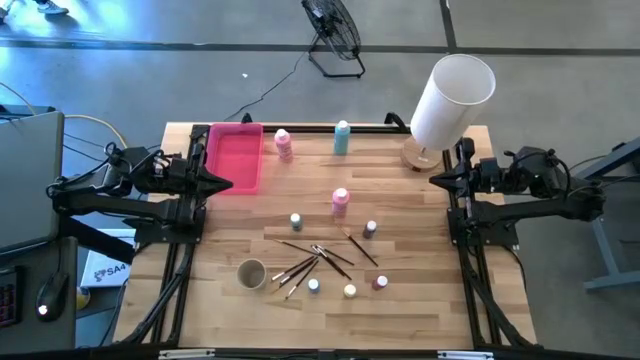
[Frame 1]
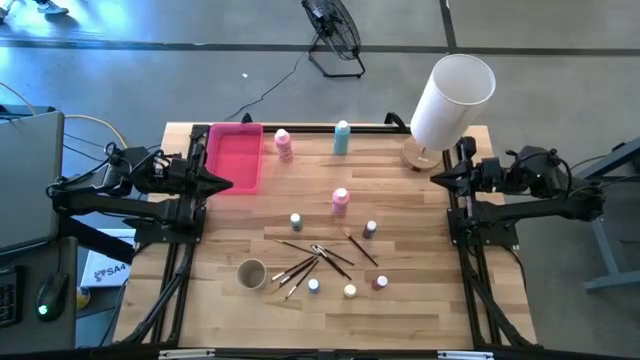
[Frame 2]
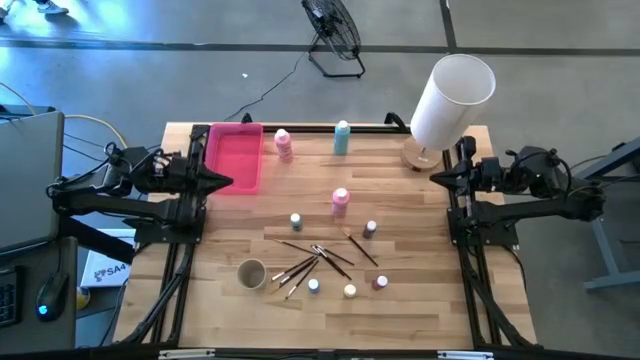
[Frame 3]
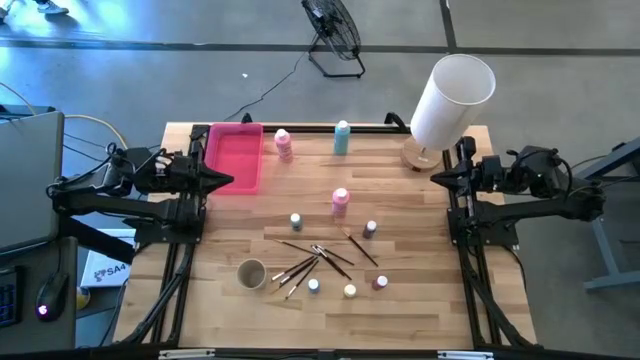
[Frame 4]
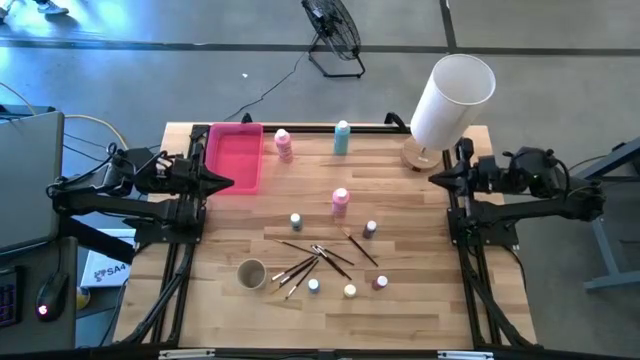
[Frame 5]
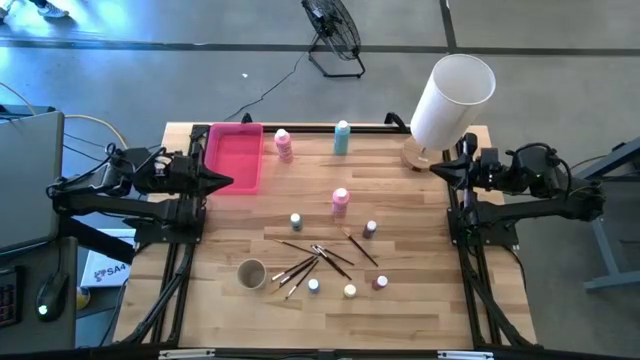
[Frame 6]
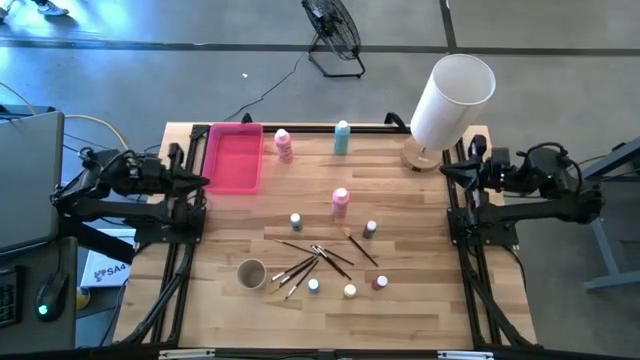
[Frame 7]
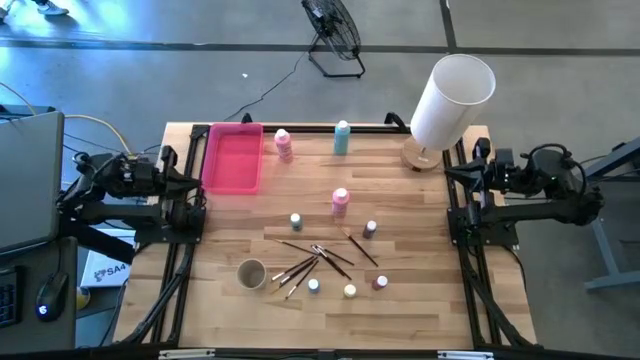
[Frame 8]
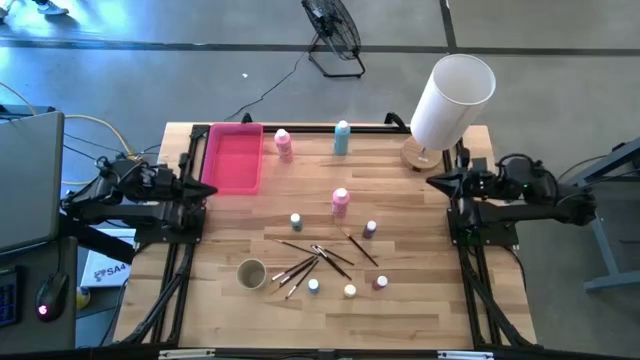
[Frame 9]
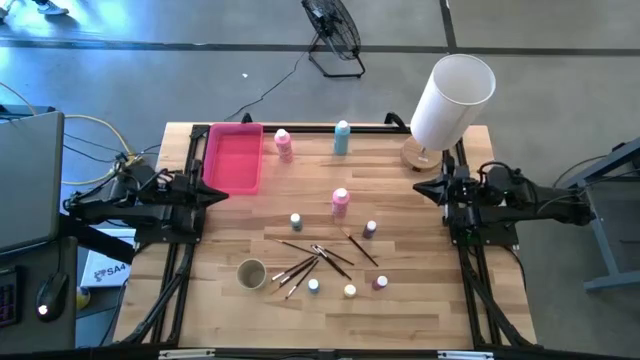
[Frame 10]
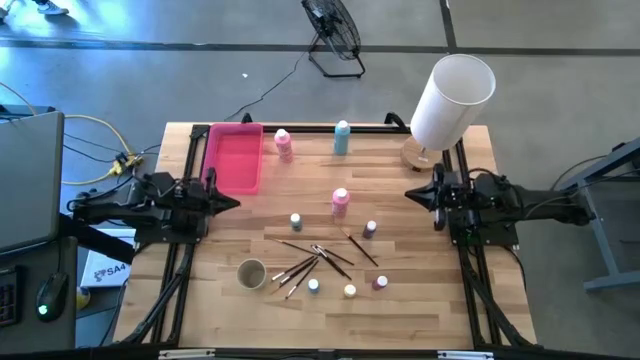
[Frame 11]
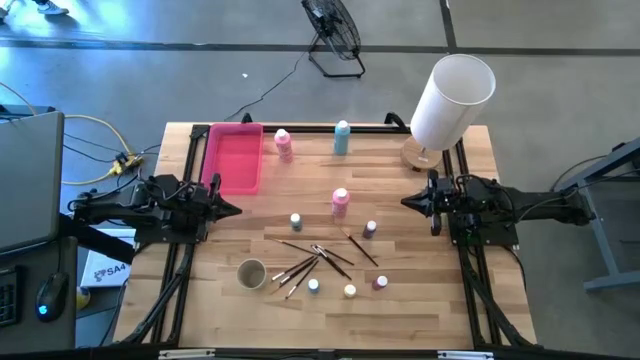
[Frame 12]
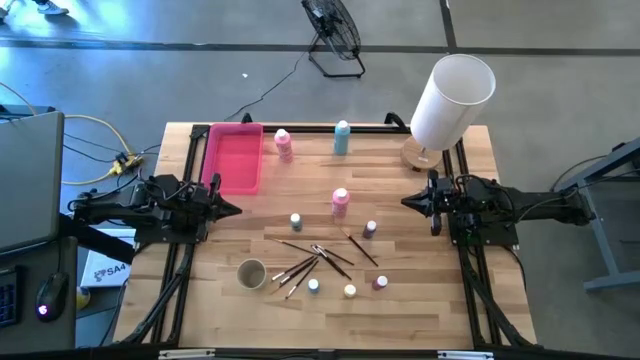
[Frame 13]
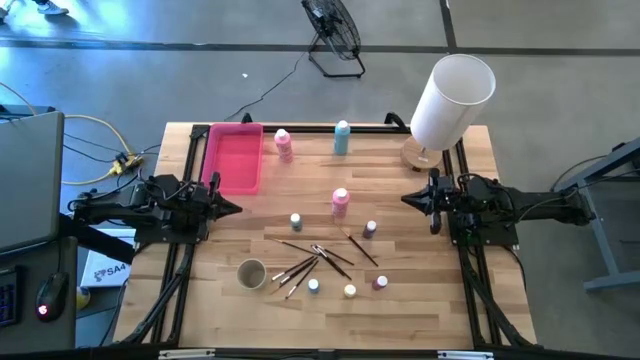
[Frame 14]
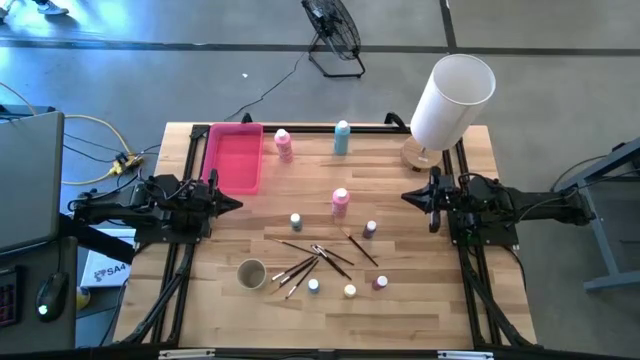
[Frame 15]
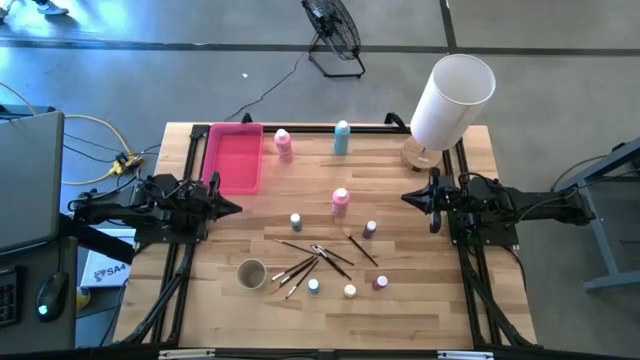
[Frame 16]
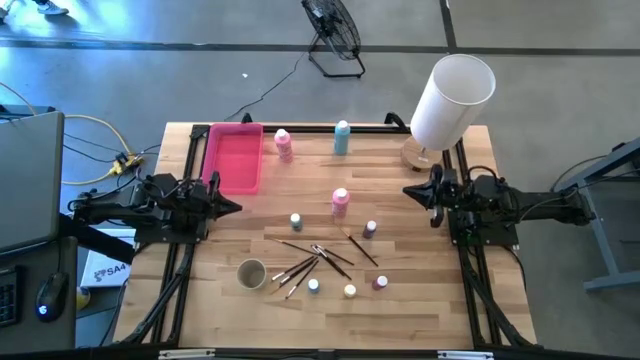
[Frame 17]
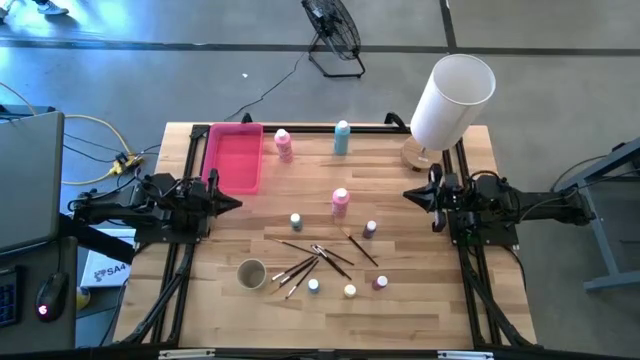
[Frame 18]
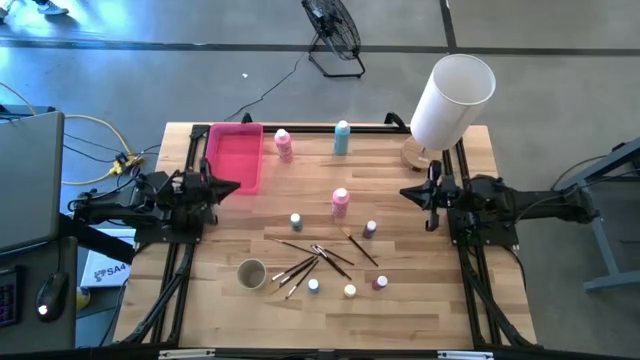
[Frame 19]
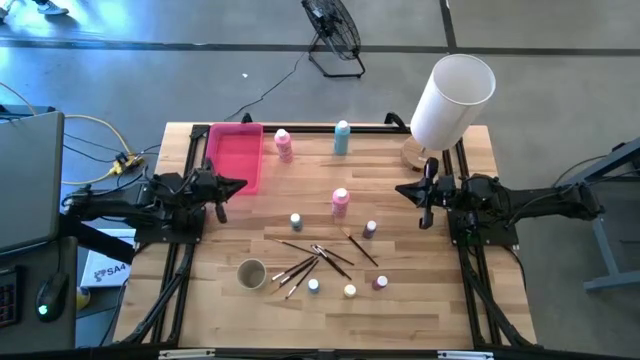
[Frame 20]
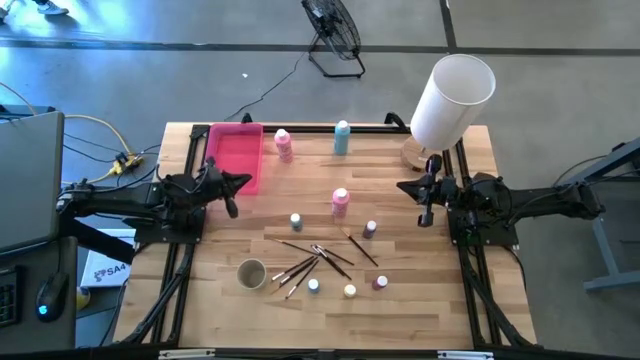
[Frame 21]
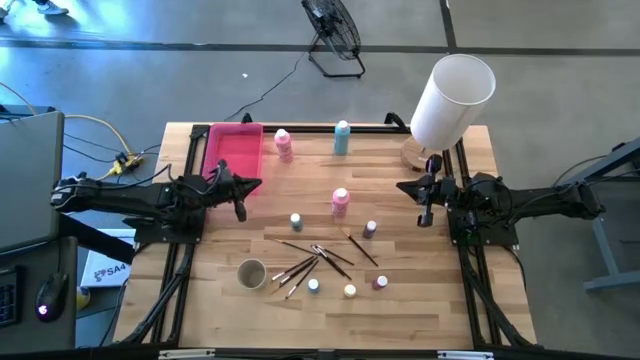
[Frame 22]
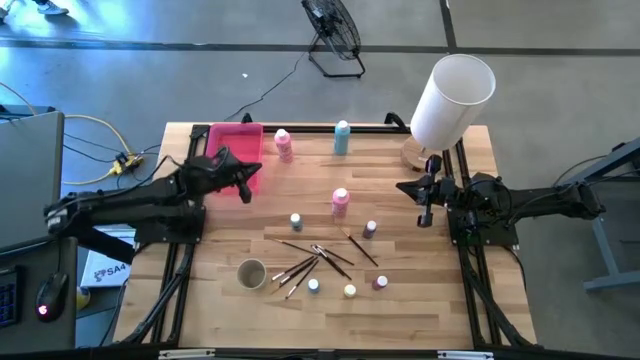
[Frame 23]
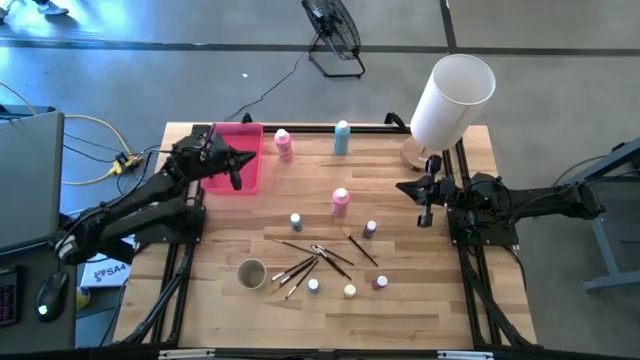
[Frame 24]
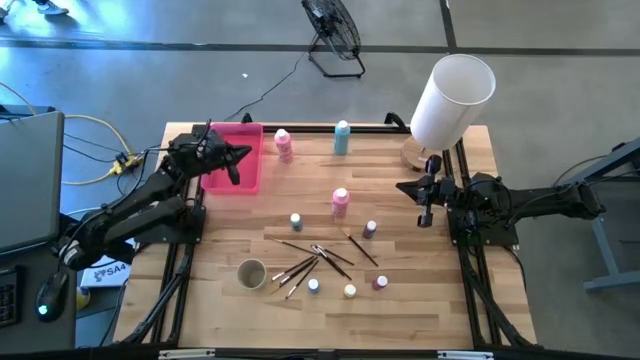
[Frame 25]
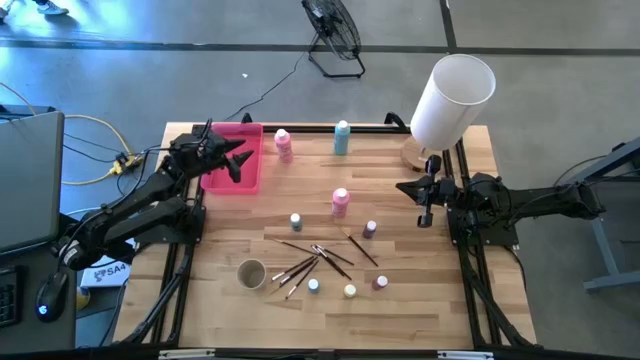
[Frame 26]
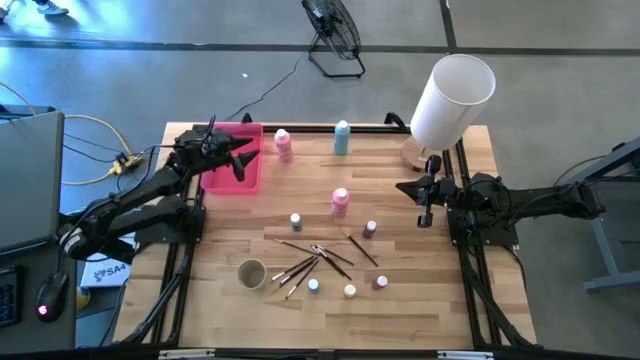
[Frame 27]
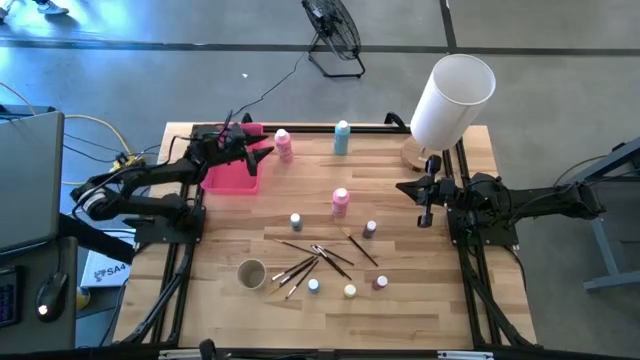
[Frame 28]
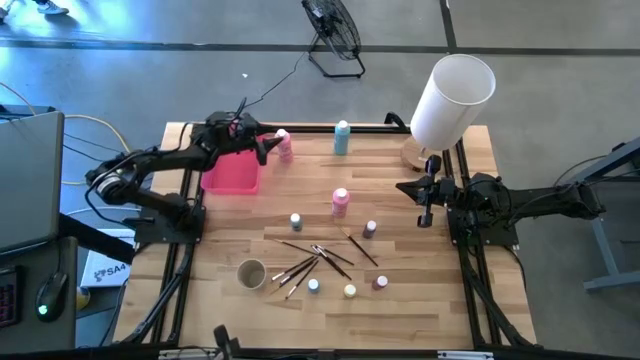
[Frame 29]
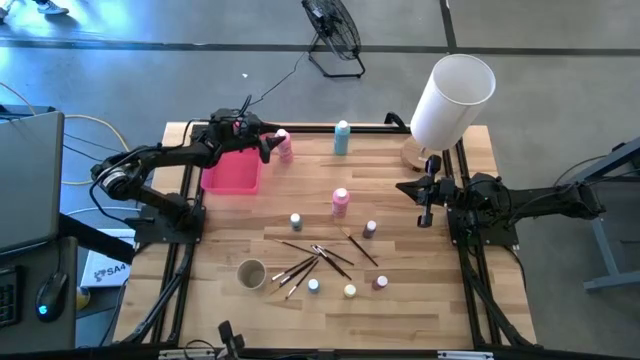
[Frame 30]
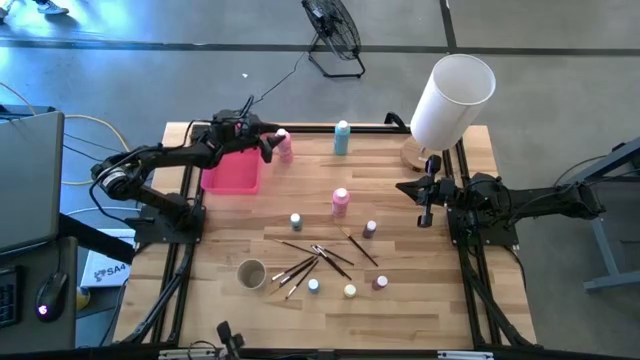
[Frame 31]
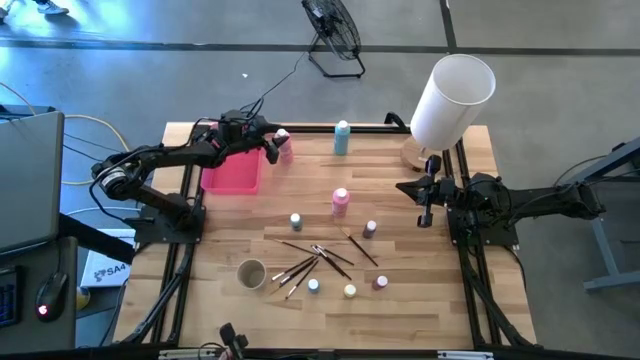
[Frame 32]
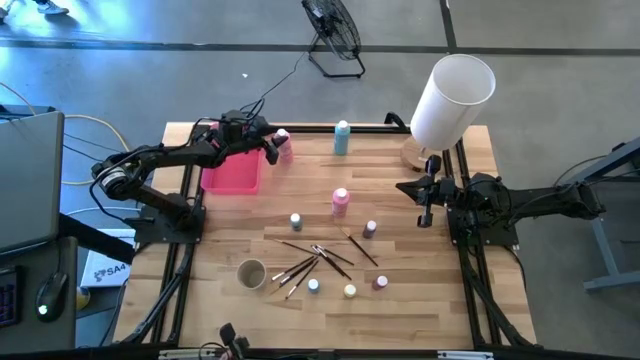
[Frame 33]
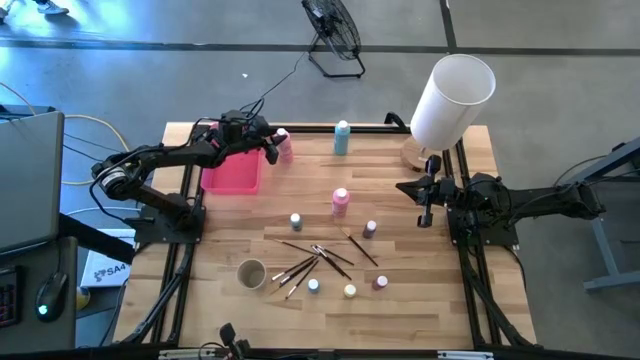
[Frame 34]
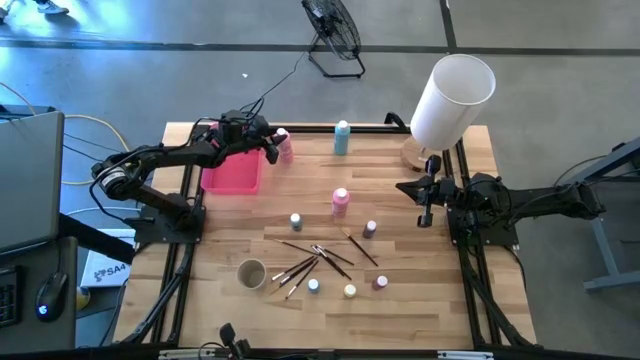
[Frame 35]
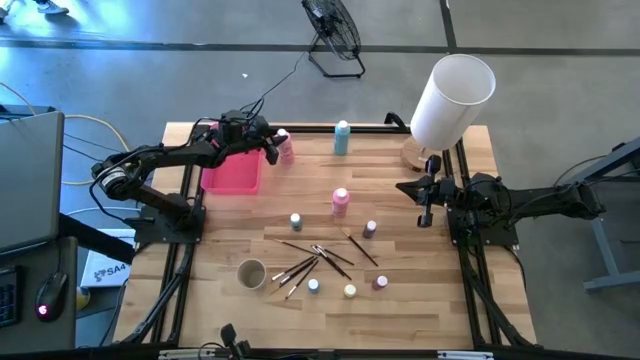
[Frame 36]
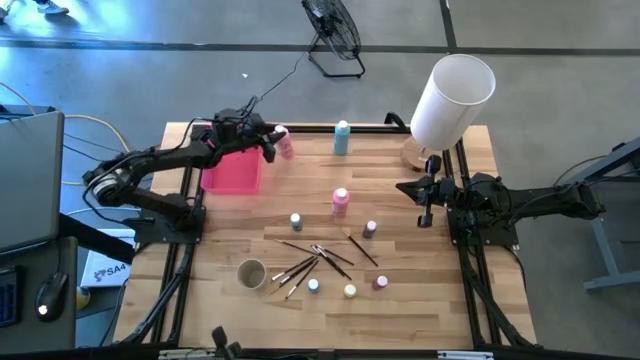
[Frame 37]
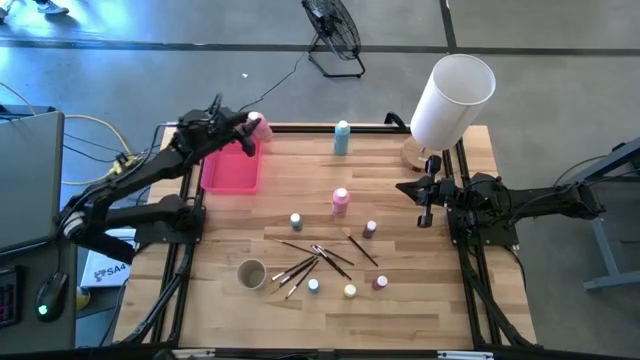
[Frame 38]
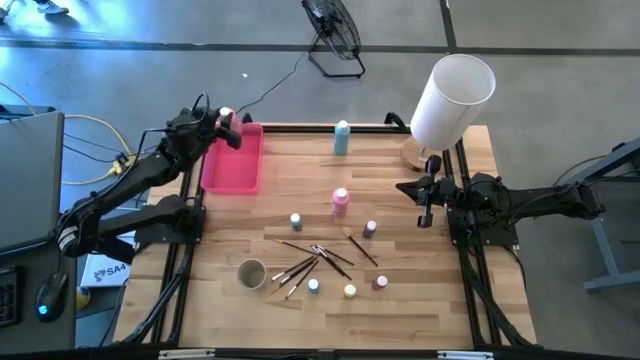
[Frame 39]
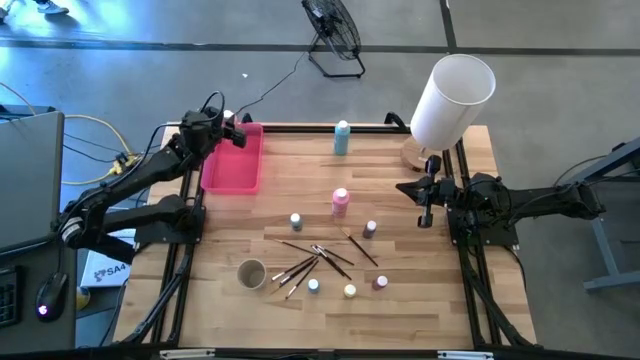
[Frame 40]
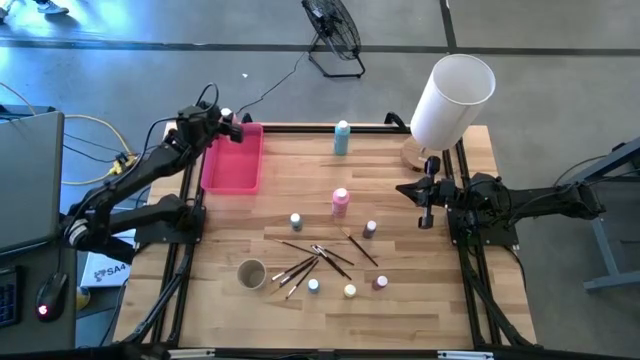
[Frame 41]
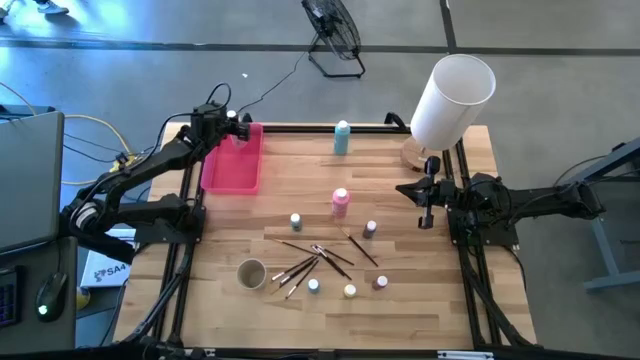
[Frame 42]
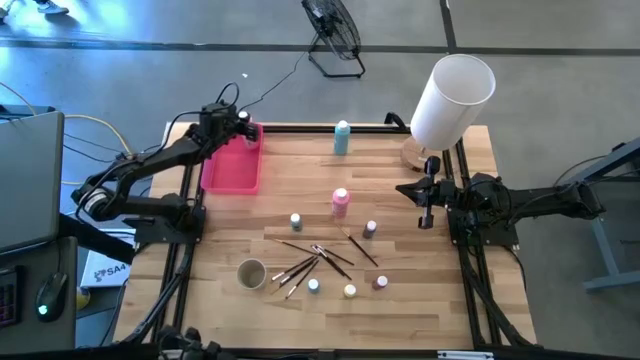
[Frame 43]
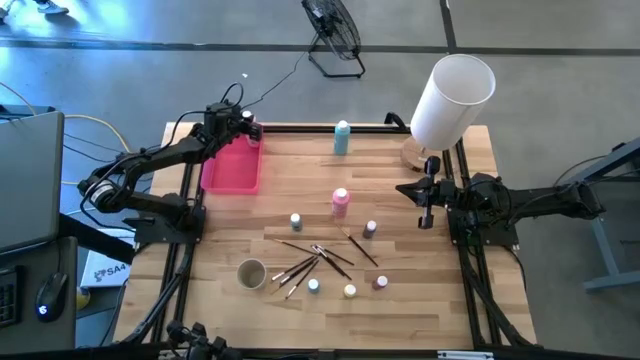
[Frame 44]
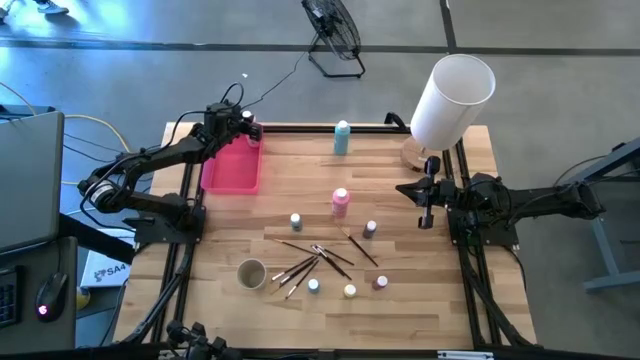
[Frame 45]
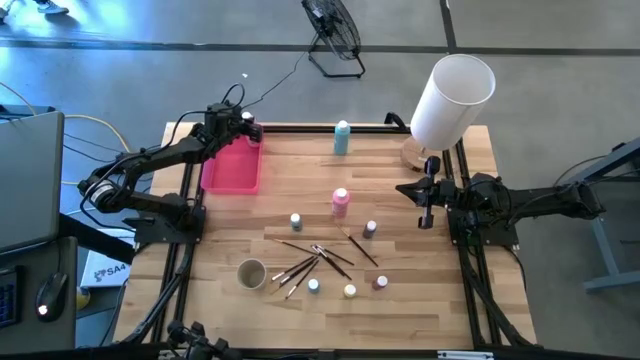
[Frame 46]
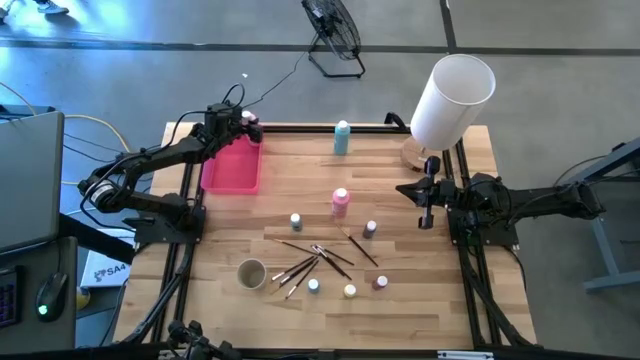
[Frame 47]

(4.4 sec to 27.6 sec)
Task: Pick & Place Paint Supplies
Put the big pink paint bottle into the pink bin
